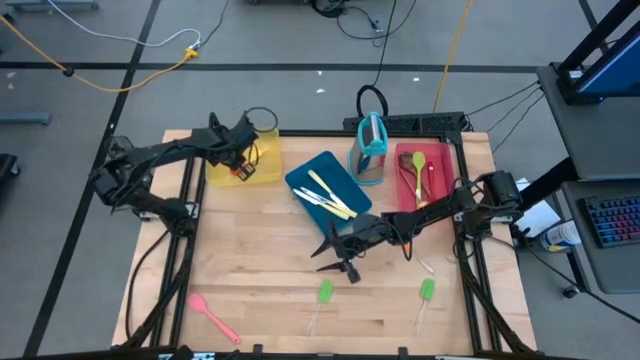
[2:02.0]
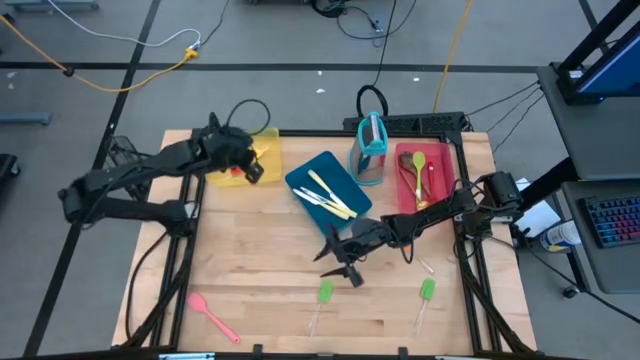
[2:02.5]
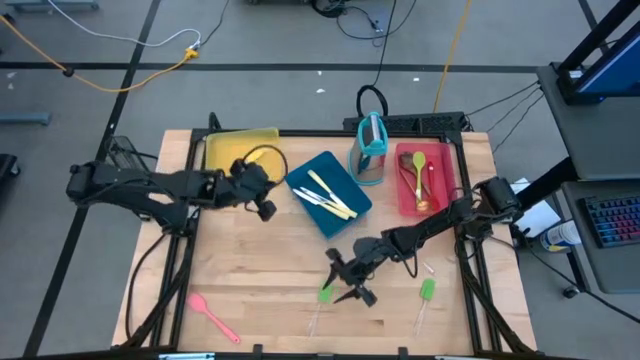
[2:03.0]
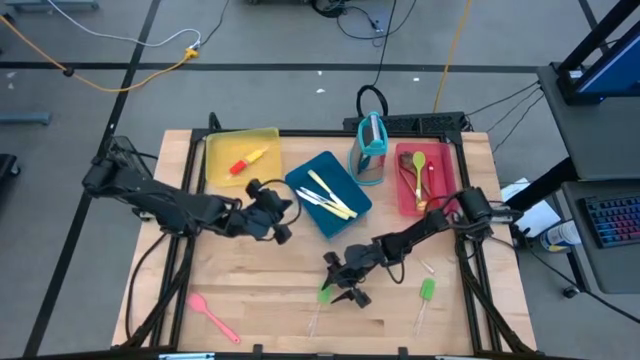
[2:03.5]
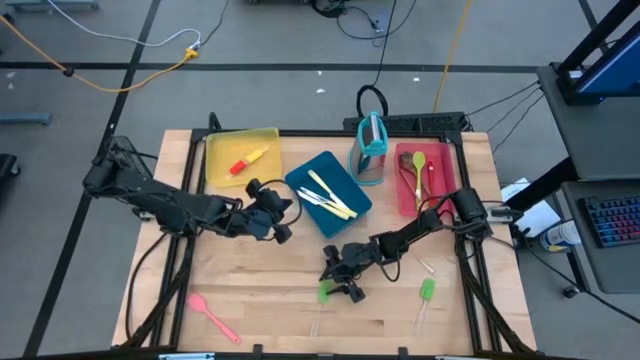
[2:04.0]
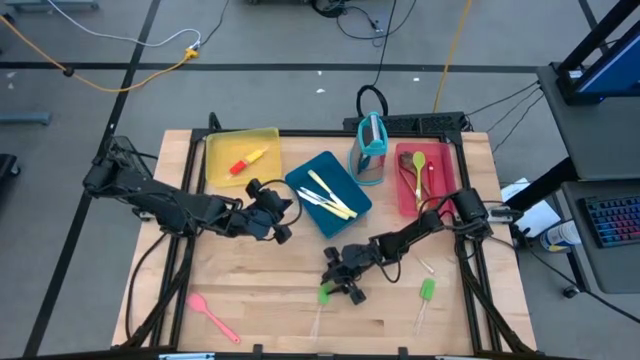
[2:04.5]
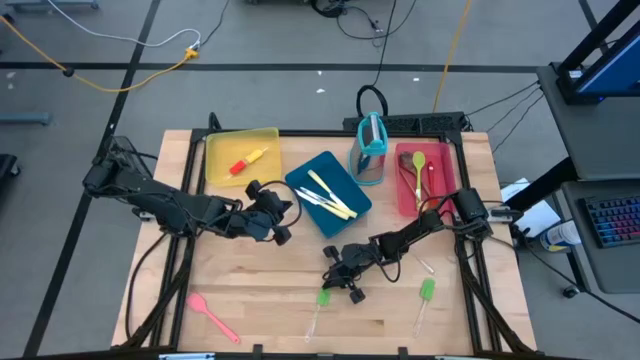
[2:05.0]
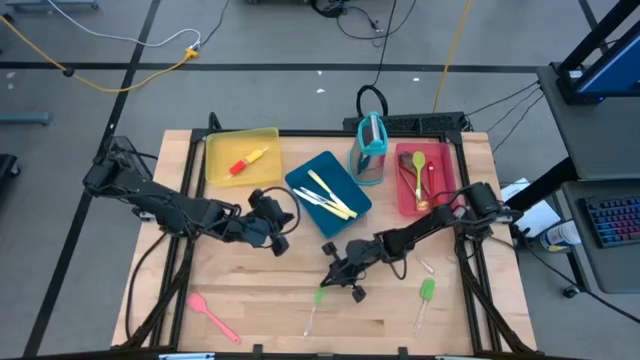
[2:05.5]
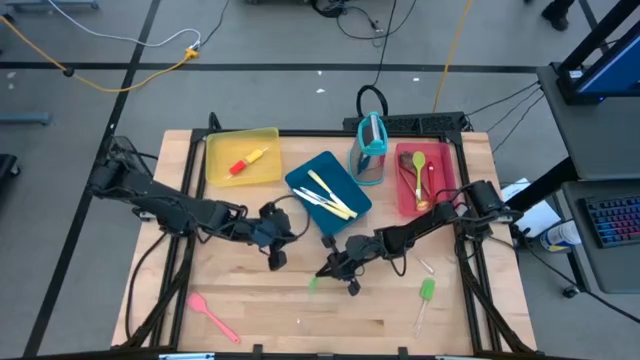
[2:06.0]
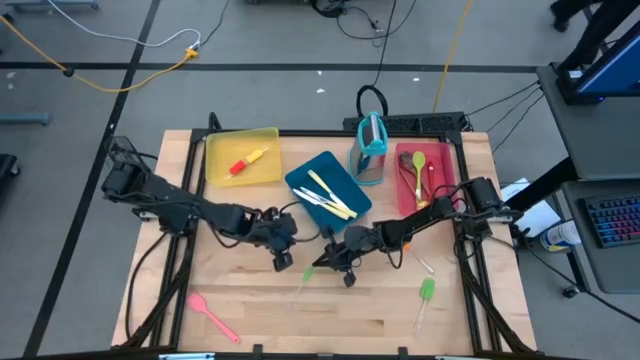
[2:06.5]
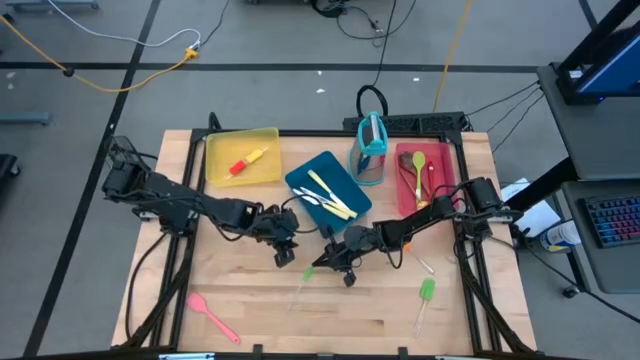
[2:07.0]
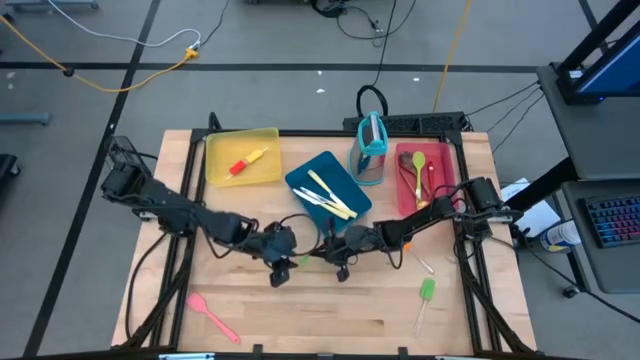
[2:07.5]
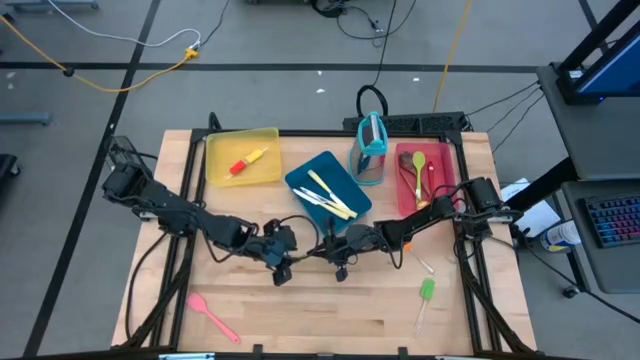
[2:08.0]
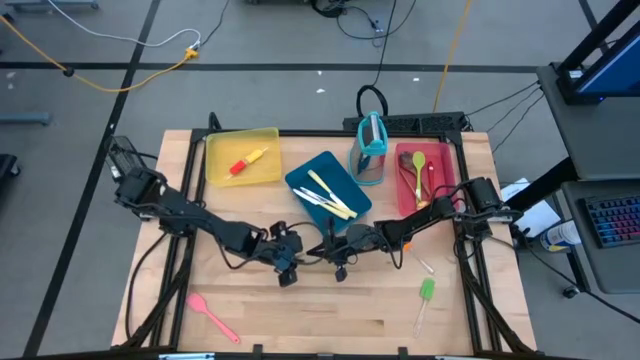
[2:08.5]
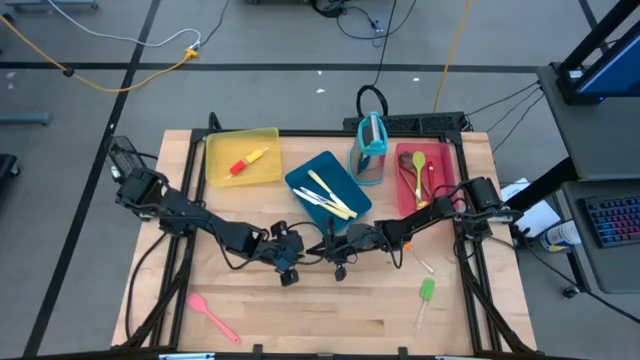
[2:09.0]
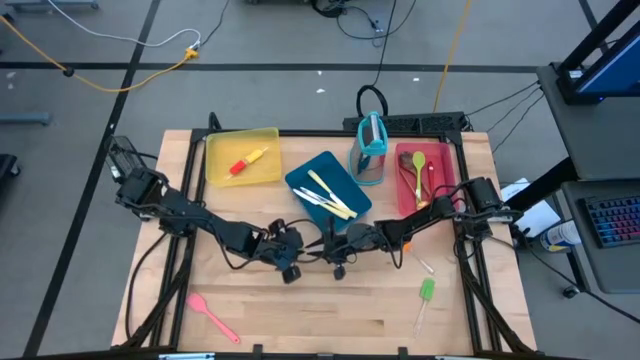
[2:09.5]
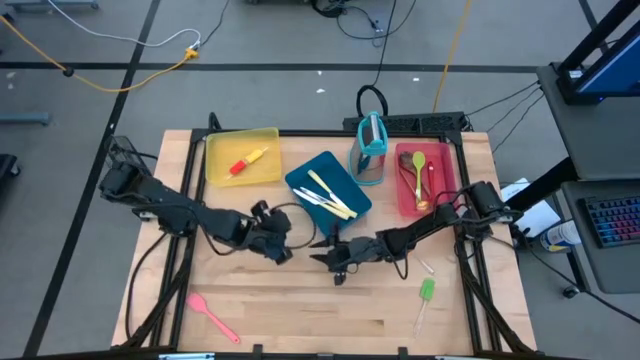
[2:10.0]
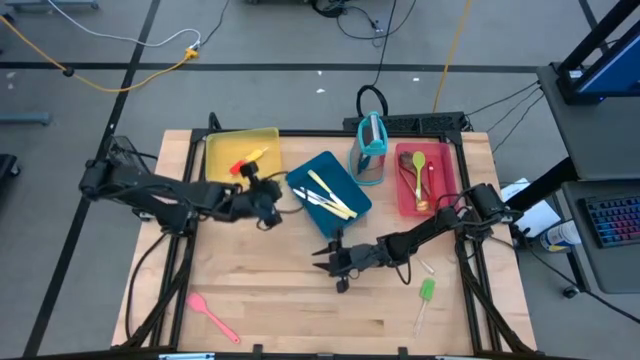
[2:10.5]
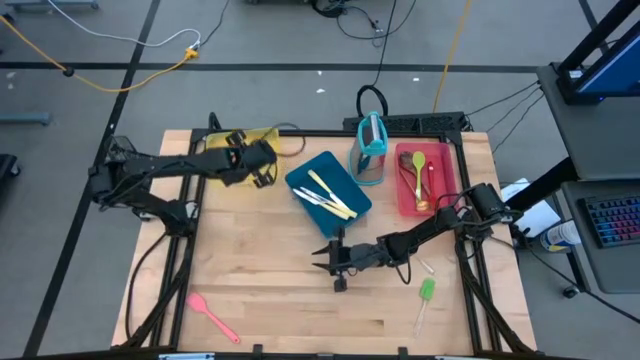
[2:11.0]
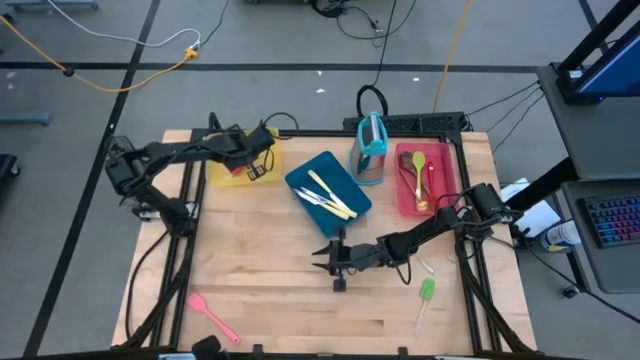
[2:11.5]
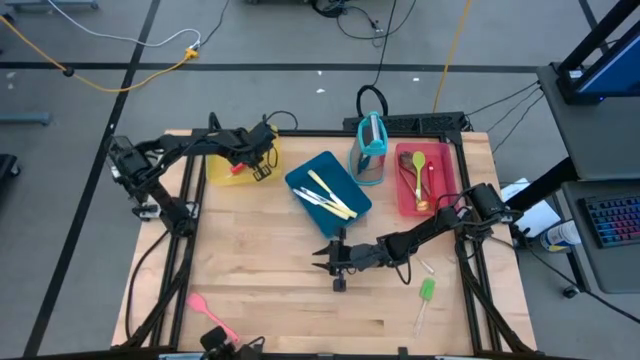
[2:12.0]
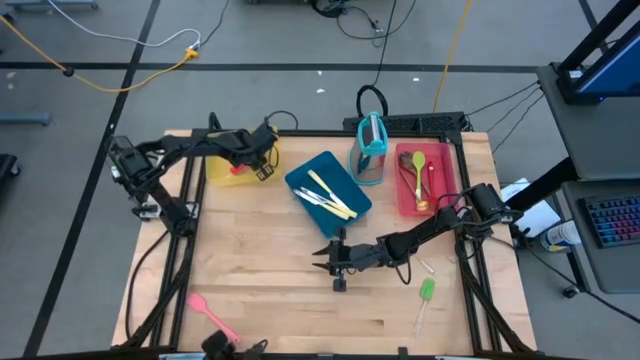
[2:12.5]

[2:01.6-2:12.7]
Task: Pick & Place Kitchen Items
Put the green spatula into the yellow bin

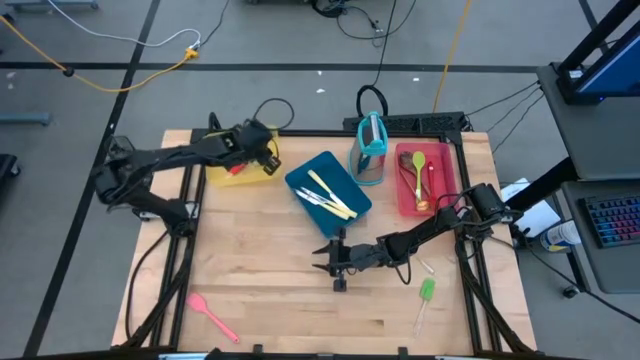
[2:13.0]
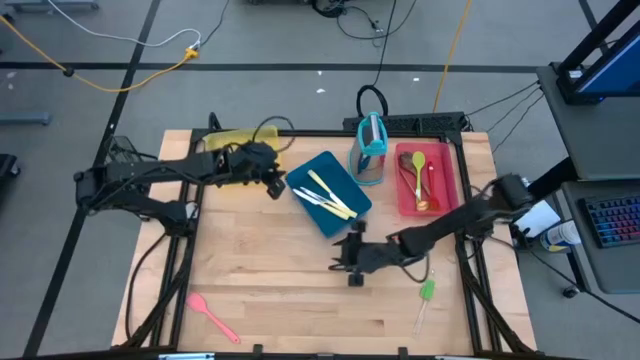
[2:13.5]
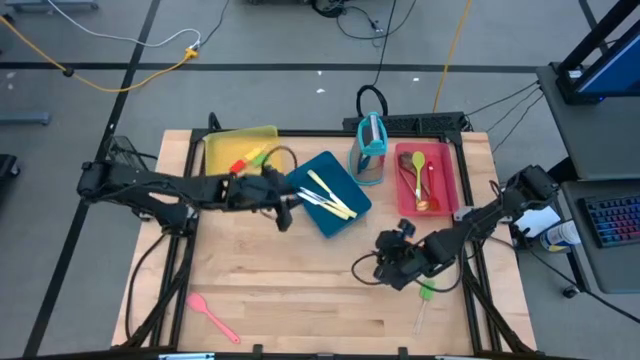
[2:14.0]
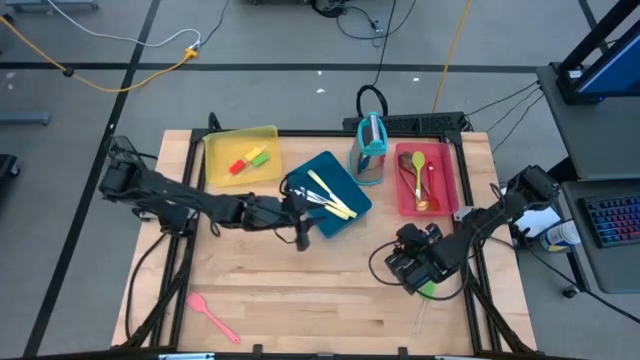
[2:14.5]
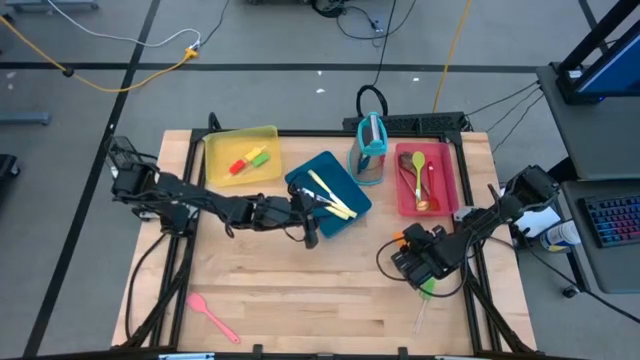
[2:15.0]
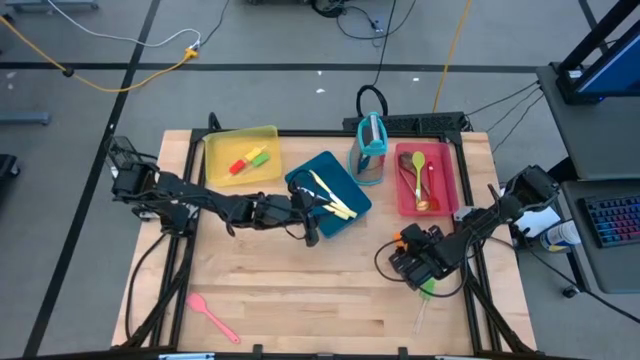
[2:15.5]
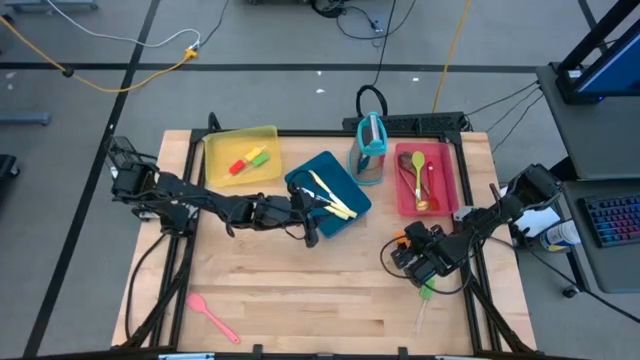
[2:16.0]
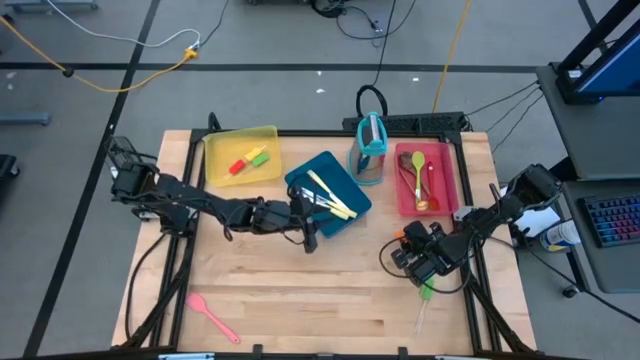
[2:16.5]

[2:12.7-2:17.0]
Put the orange spatula into the yellow bin

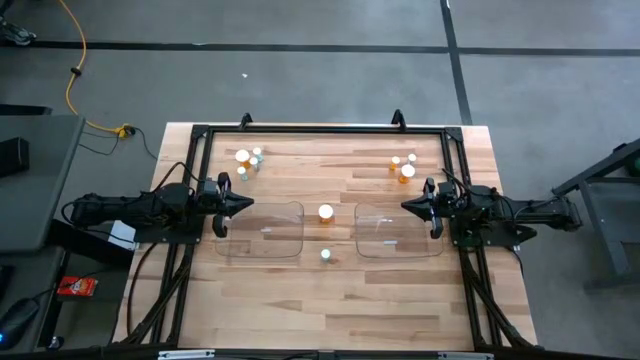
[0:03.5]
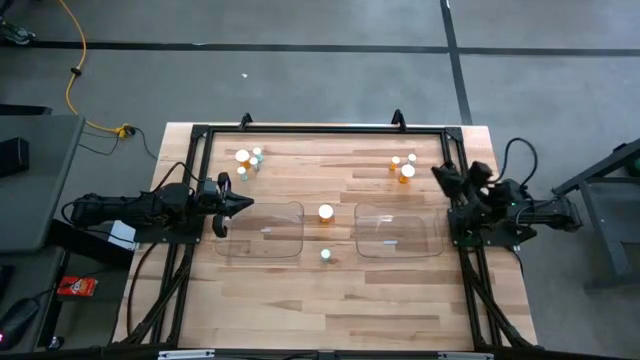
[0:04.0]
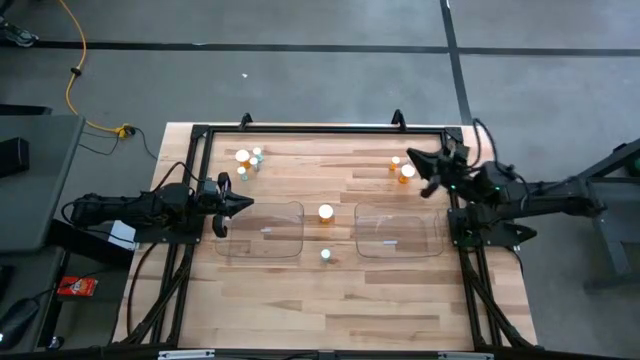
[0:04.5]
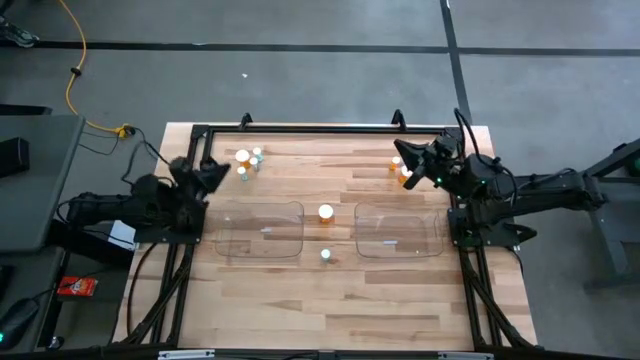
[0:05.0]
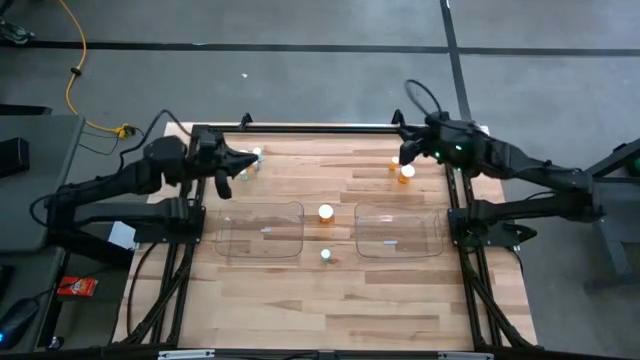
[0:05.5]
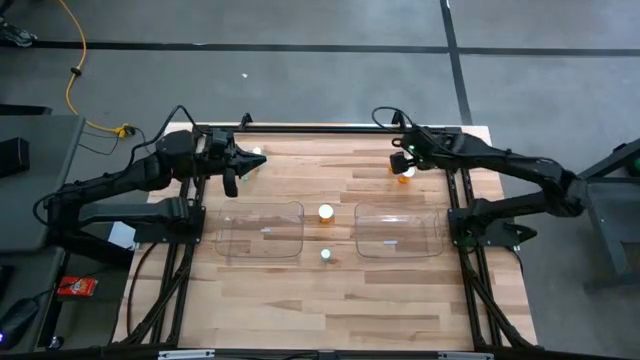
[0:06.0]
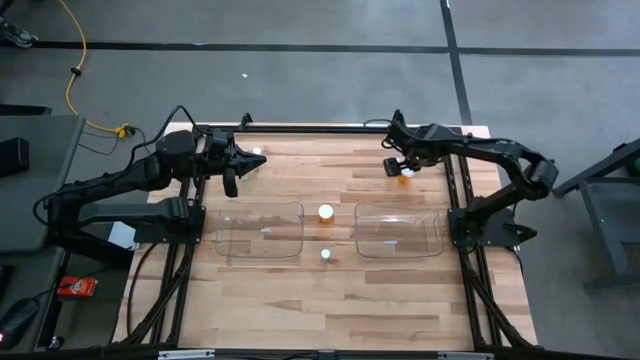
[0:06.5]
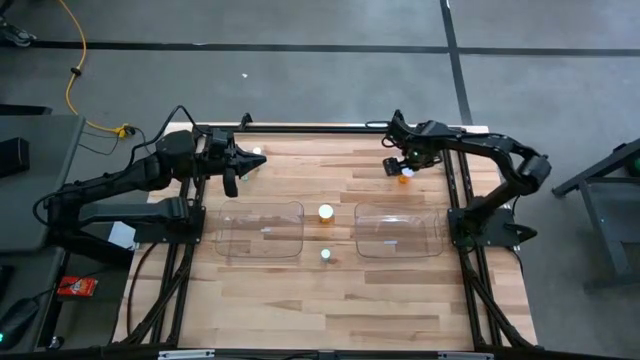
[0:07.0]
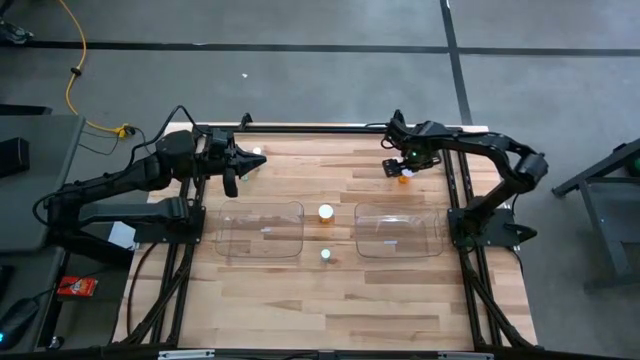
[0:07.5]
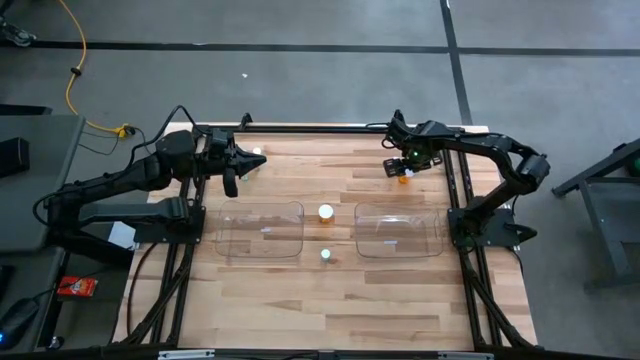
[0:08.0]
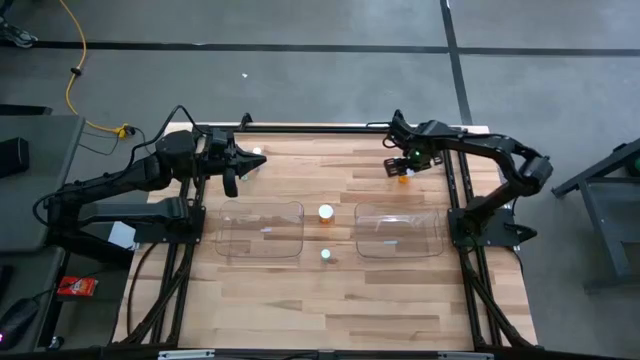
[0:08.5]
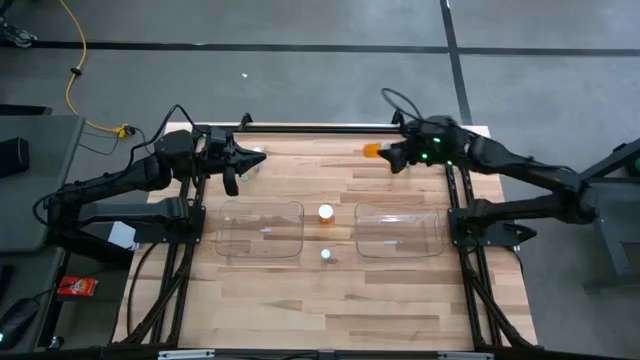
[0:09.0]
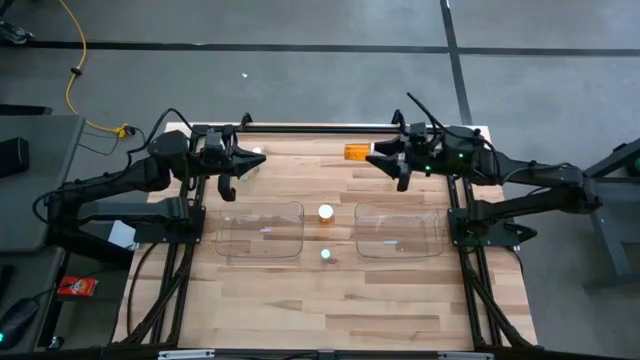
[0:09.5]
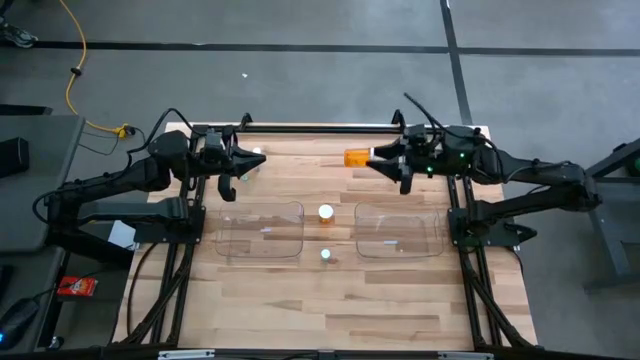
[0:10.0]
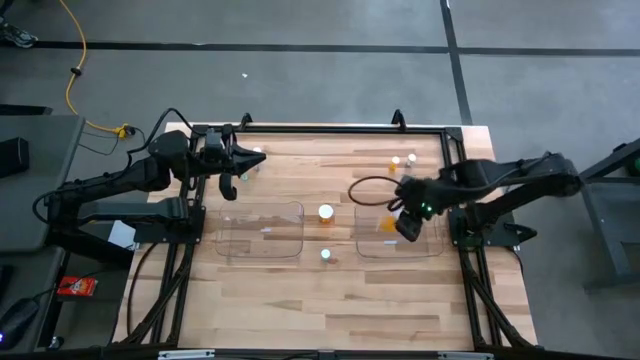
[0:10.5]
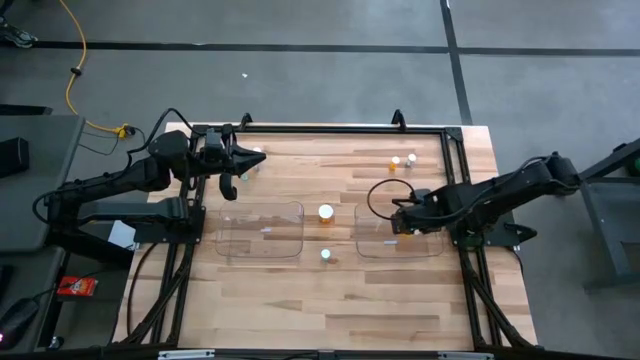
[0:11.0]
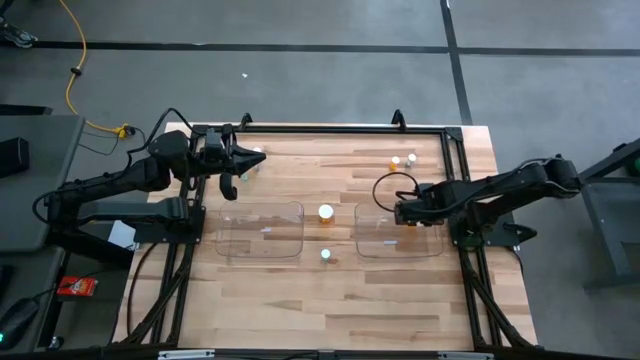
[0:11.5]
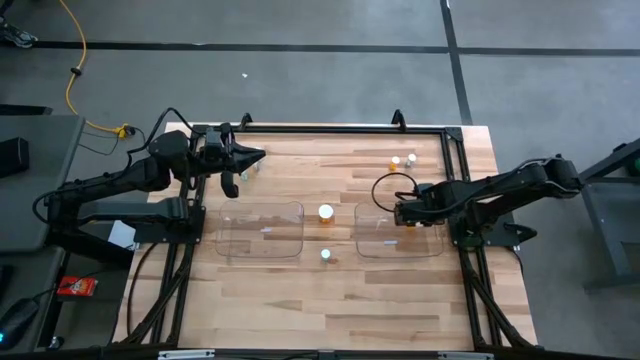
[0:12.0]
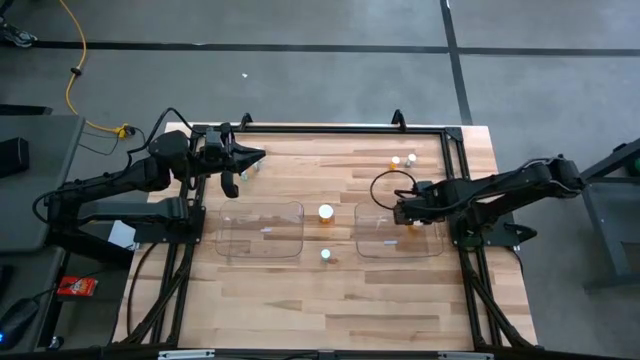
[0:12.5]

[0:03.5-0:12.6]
Task: Pick and place medicine bottles into bin by pill shape (circle, oval)
Put the top right orange capsule bottle into the right transparent bin
